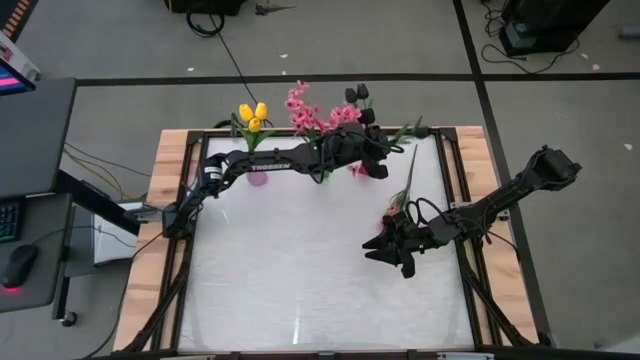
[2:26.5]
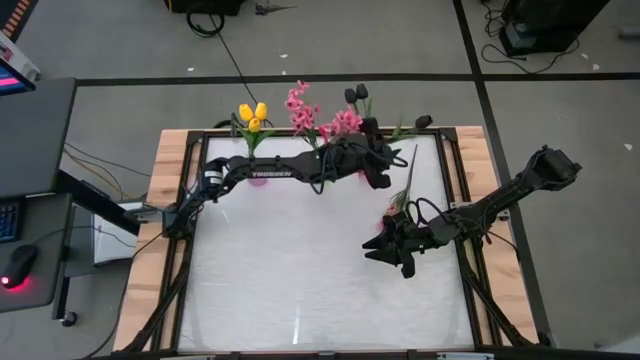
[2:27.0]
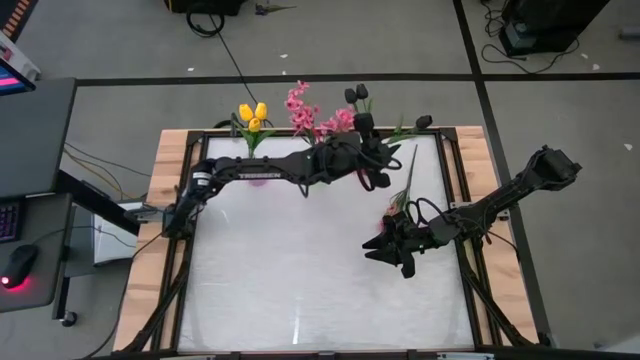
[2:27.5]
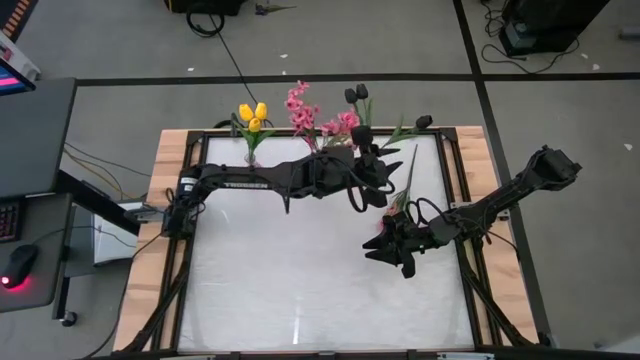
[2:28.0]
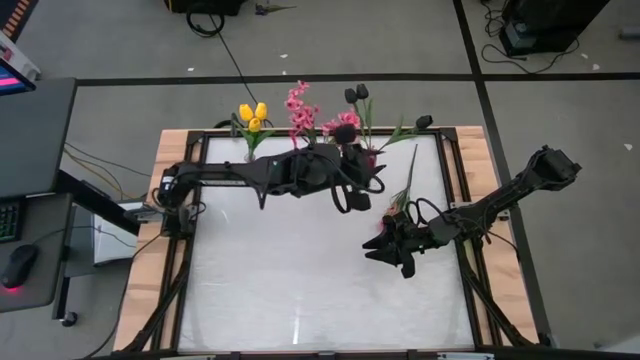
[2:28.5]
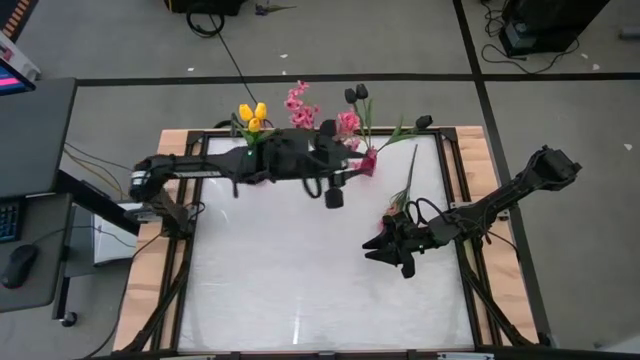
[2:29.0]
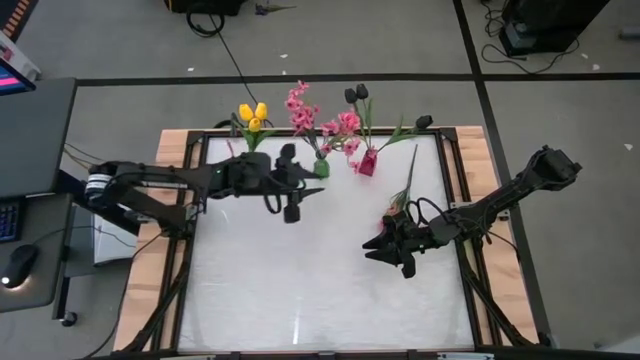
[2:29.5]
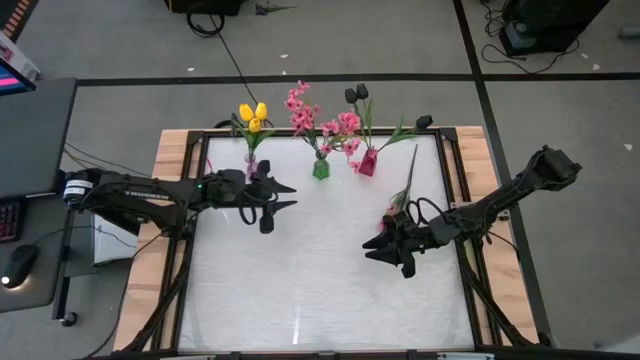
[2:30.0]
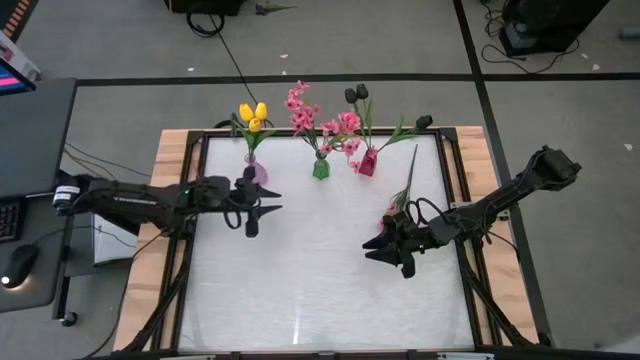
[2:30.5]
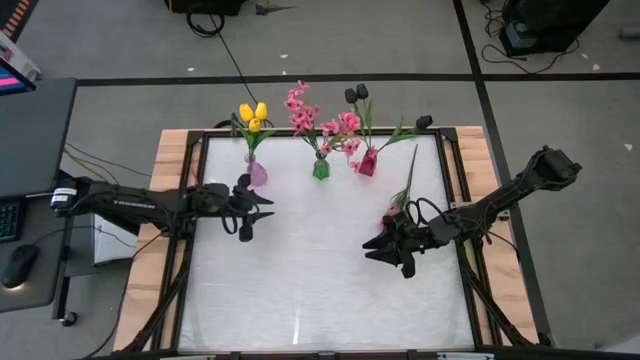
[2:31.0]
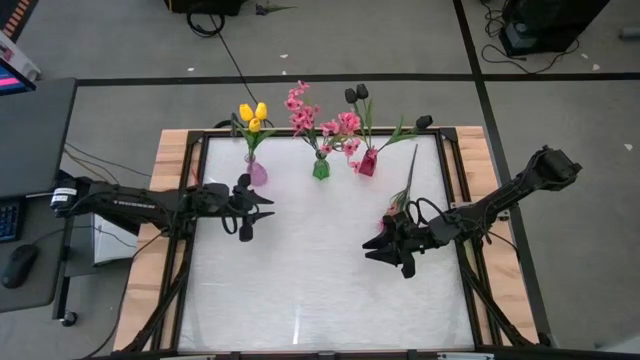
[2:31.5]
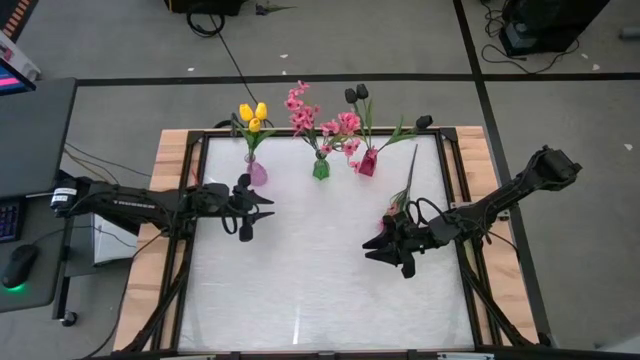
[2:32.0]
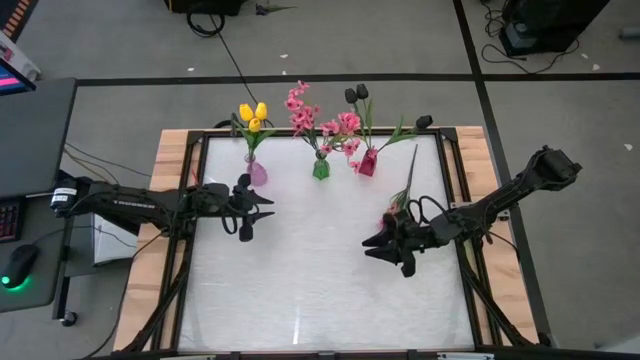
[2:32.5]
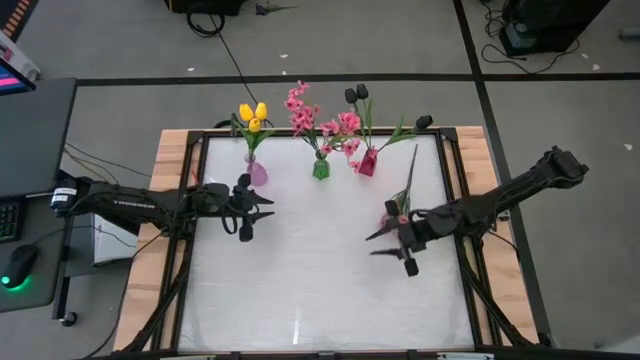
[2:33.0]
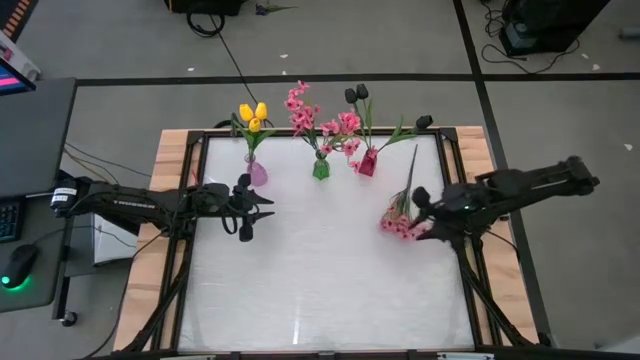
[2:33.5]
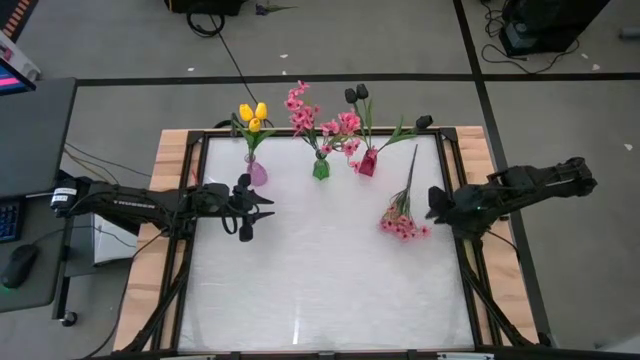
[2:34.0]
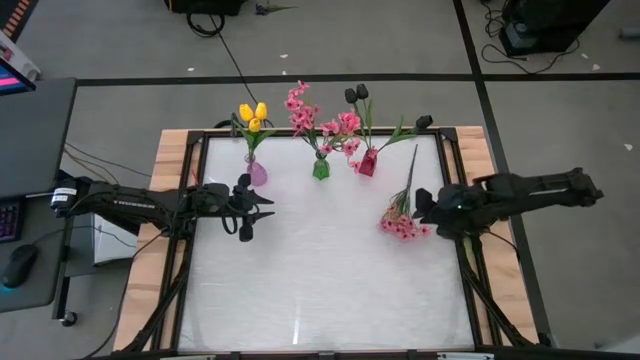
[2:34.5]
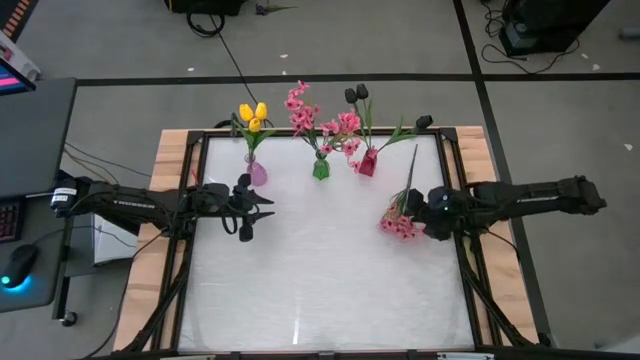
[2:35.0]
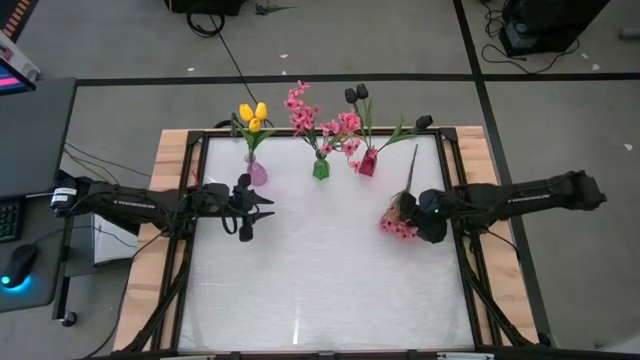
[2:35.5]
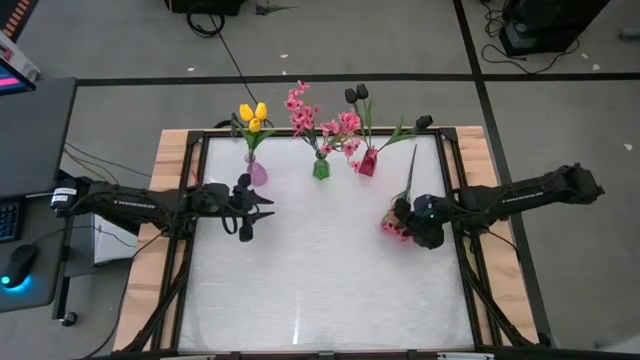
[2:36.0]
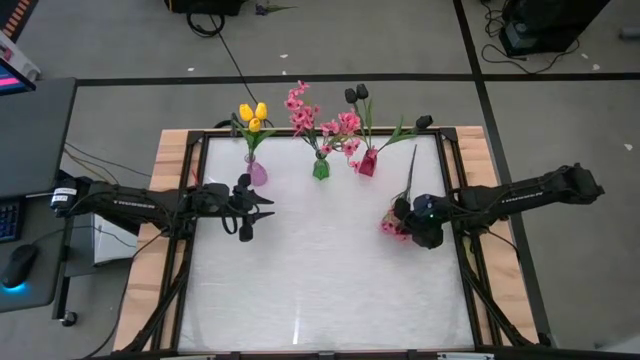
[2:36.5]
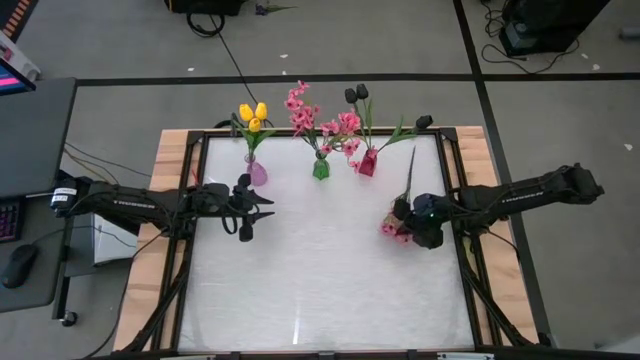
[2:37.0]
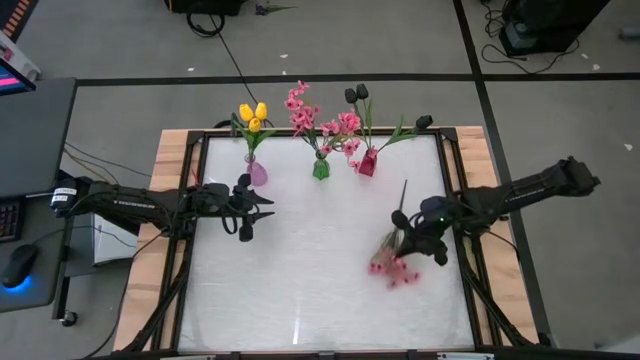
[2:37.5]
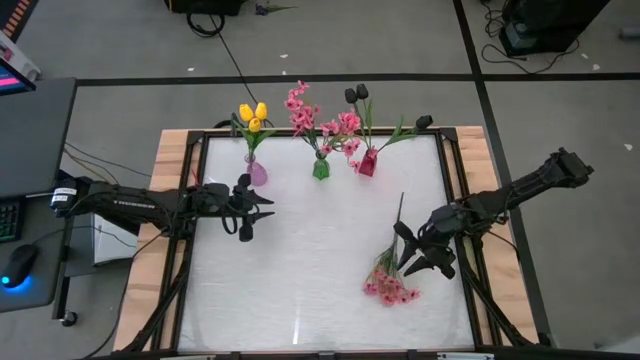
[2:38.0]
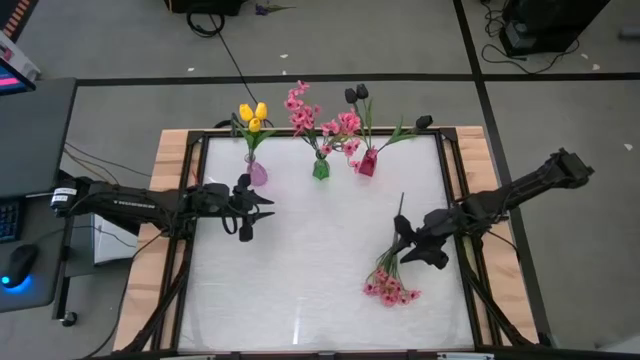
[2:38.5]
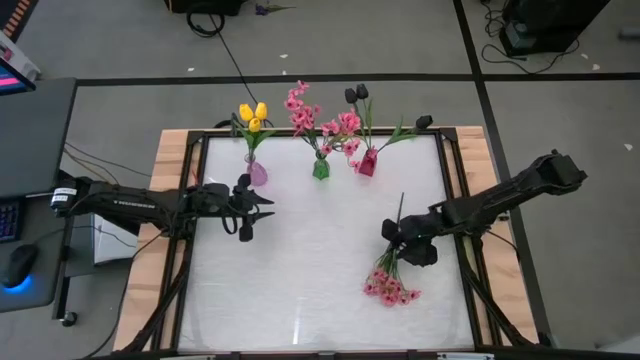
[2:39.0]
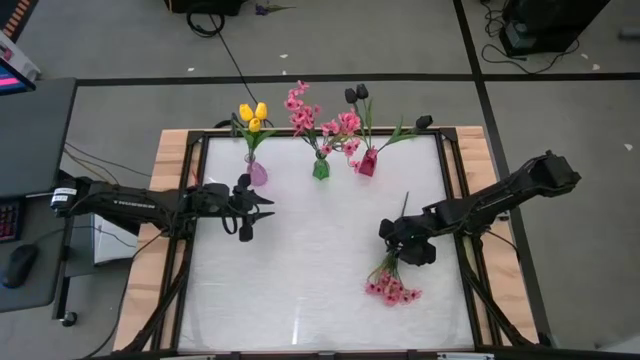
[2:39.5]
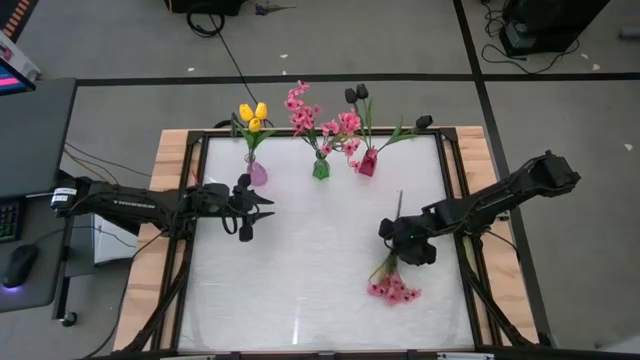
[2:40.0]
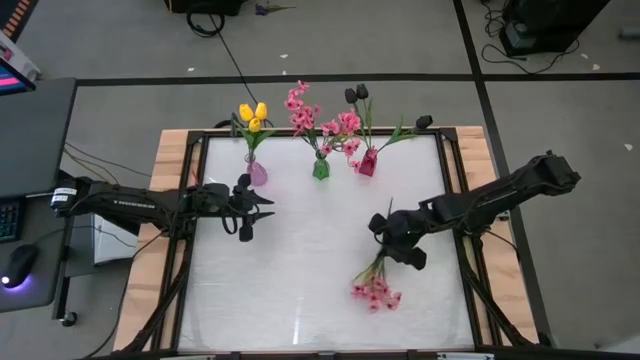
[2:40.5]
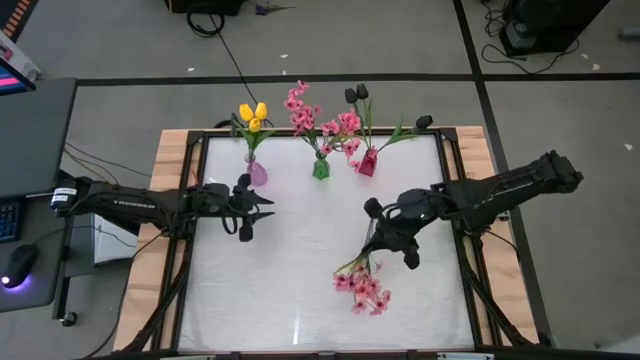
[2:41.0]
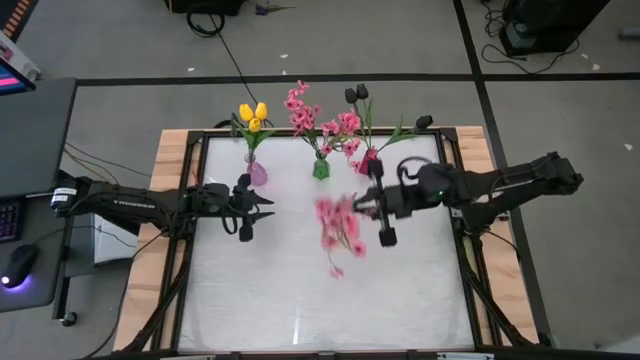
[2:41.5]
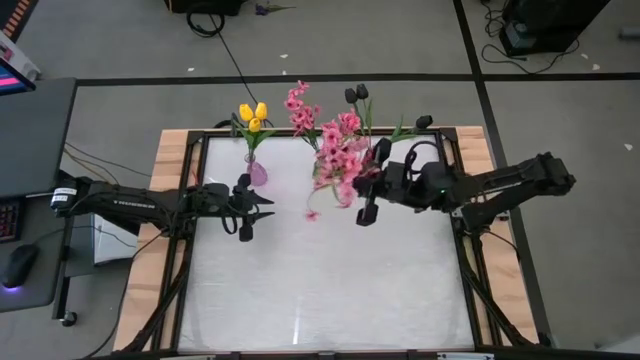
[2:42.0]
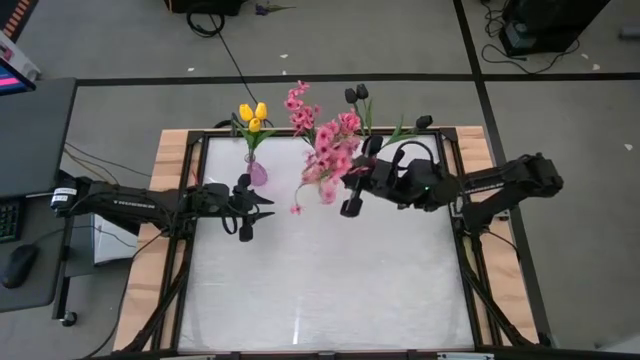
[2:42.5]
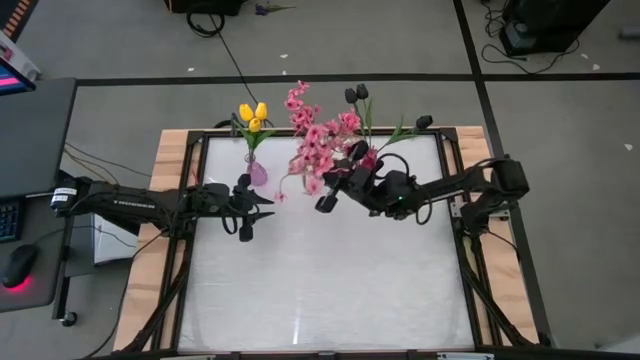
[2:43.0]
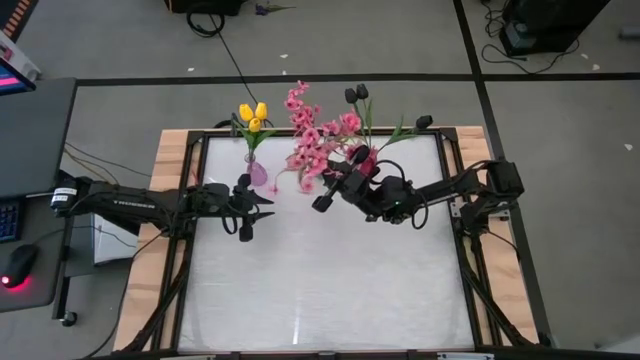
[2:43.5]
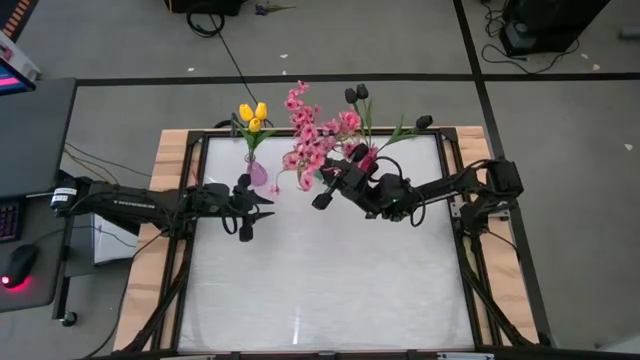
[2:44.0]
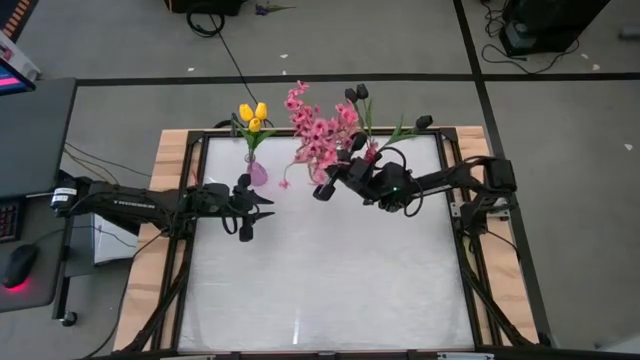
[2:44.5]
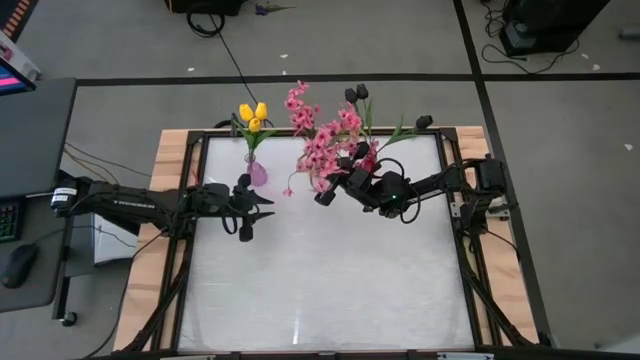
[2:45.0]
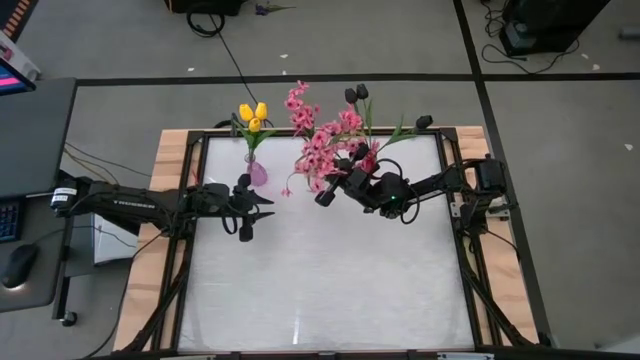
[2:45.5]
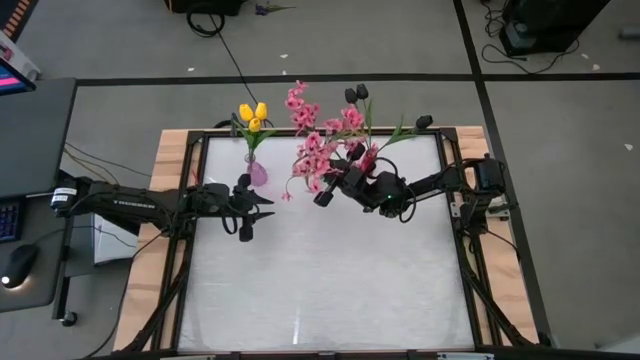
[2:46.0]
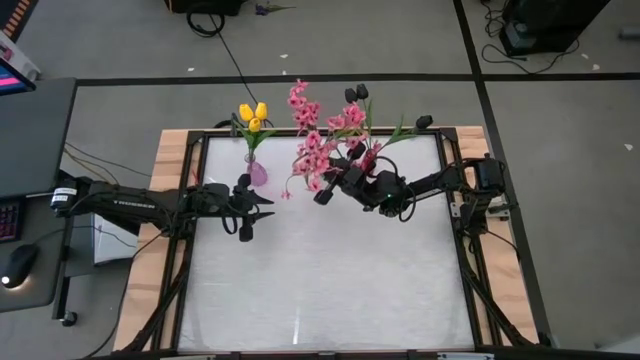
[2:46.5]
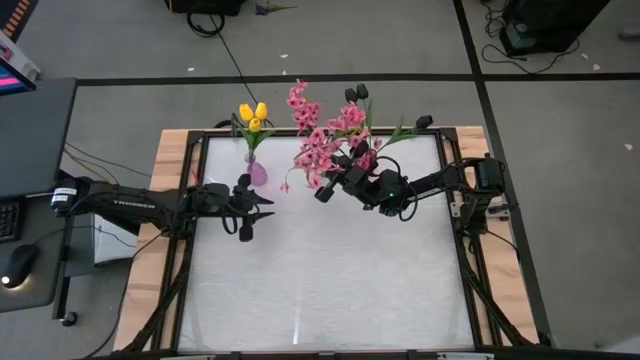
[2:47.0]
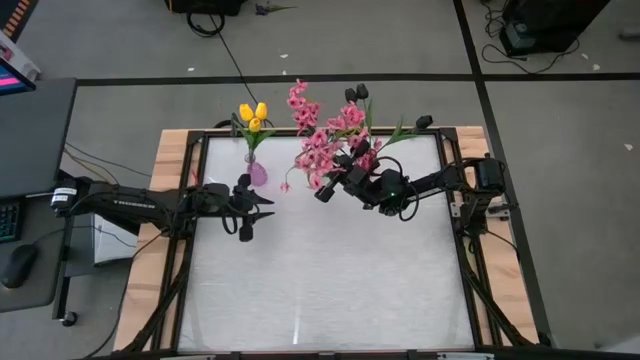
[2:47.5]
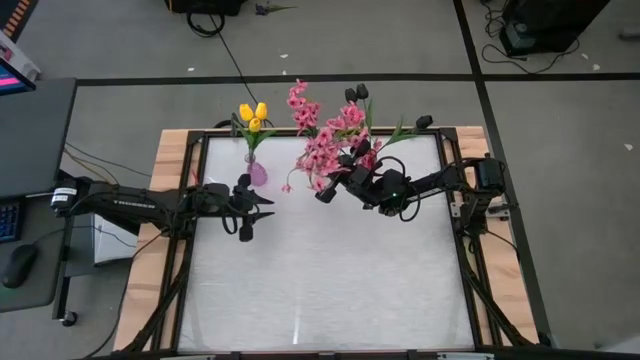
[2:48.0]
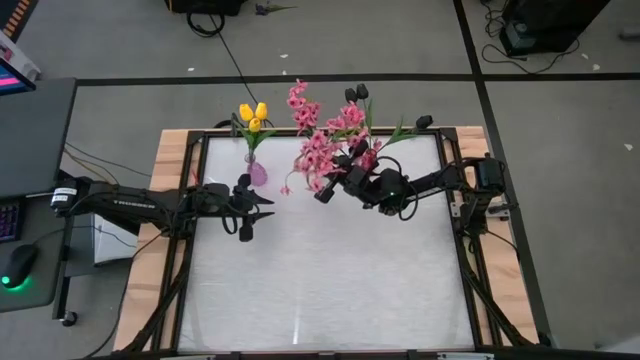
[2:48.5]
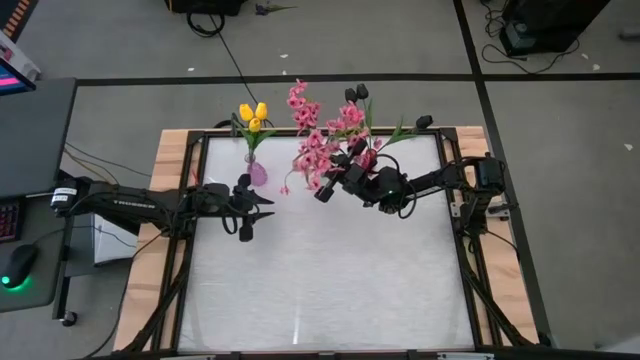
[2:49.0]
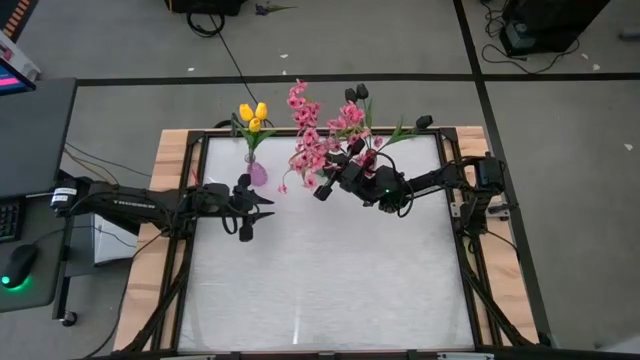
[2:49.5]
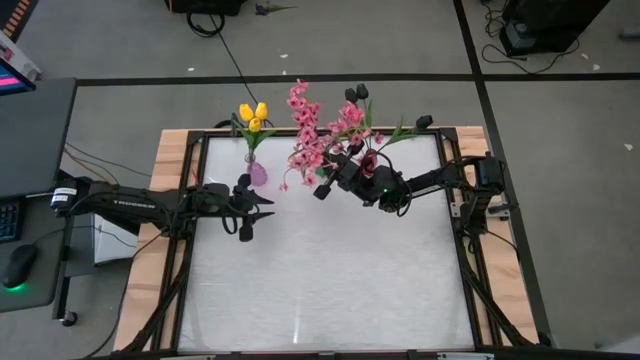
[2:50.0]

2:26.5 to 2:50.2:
Task: Sort flowers into vase by color
Put the pink flower into the green vase
